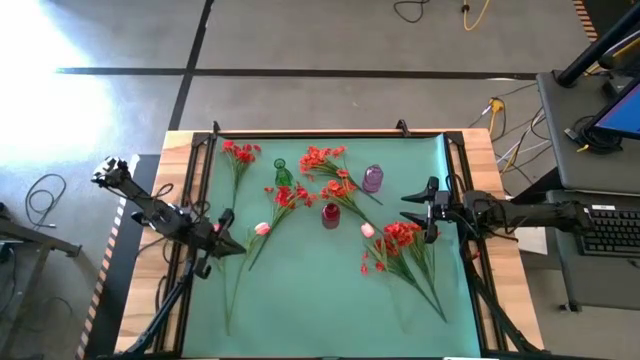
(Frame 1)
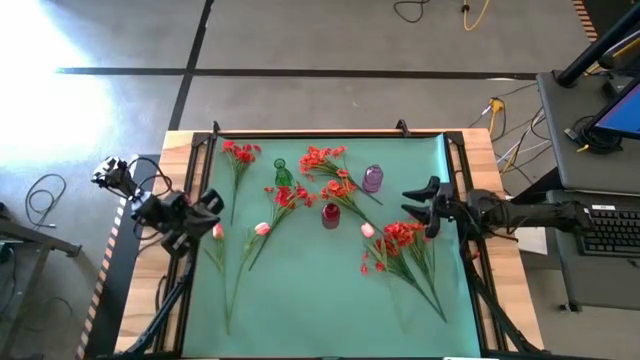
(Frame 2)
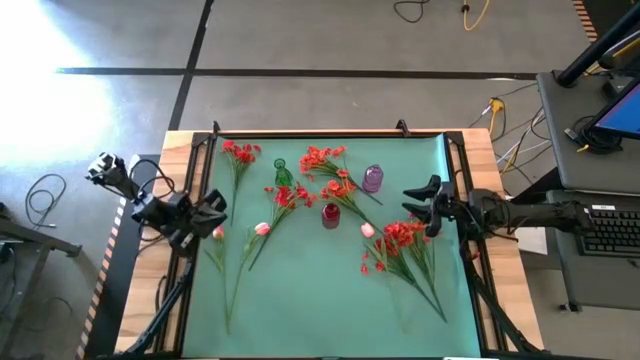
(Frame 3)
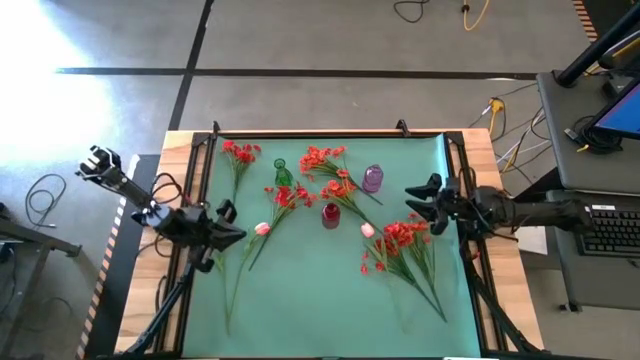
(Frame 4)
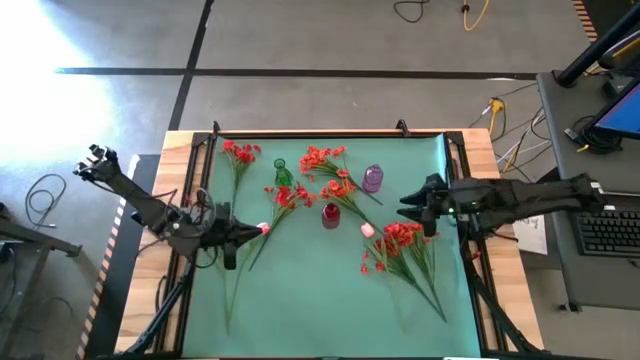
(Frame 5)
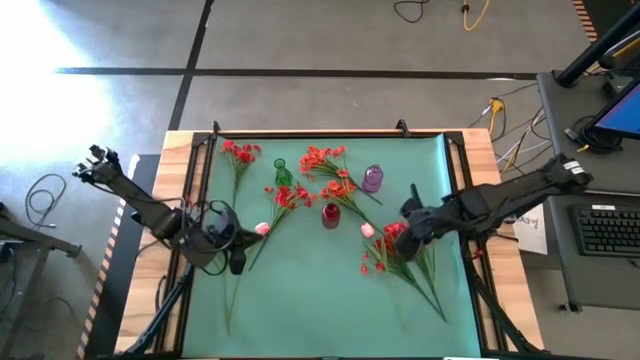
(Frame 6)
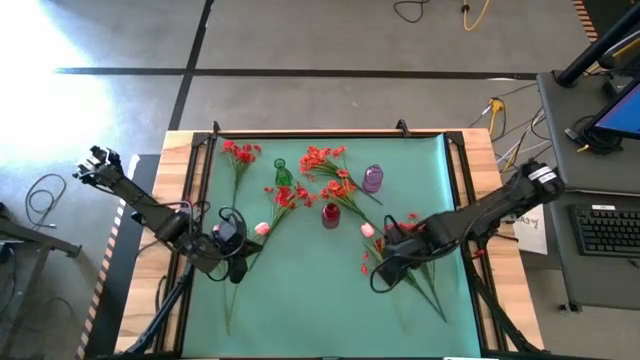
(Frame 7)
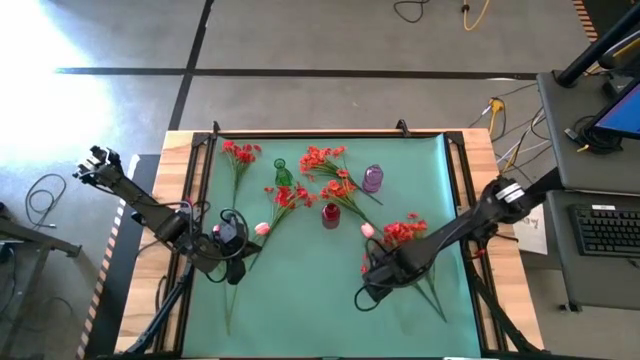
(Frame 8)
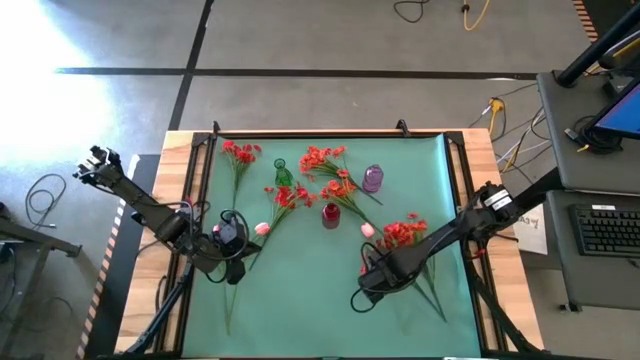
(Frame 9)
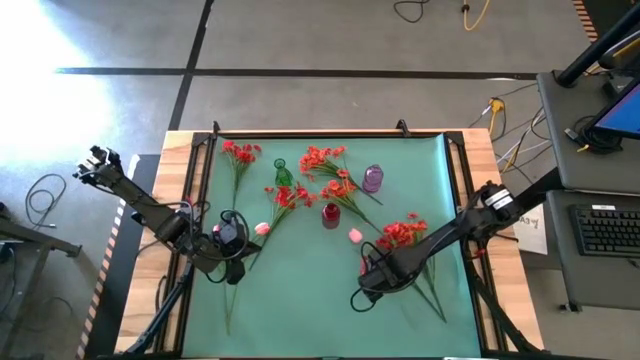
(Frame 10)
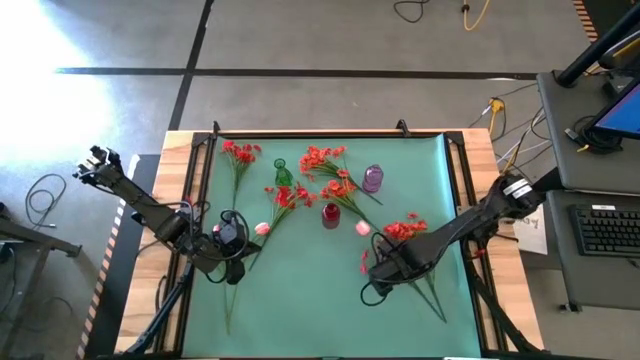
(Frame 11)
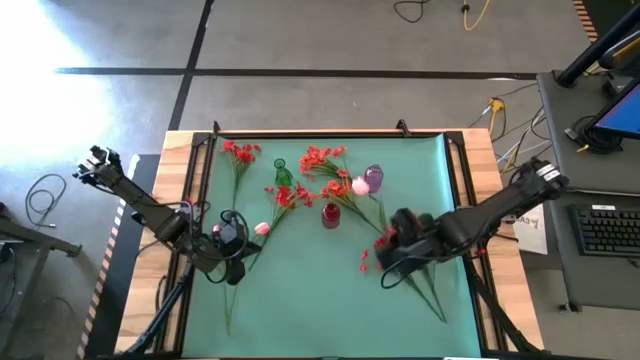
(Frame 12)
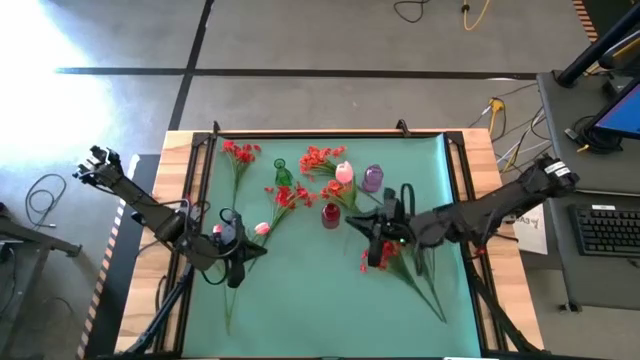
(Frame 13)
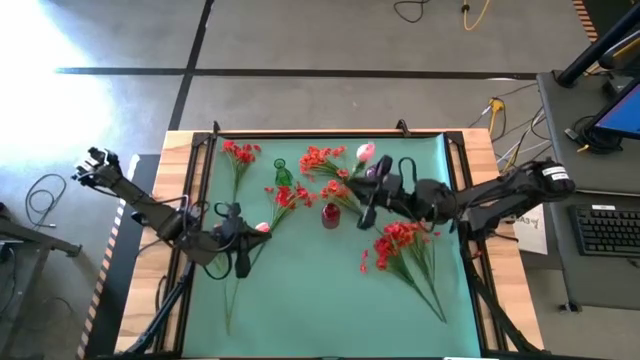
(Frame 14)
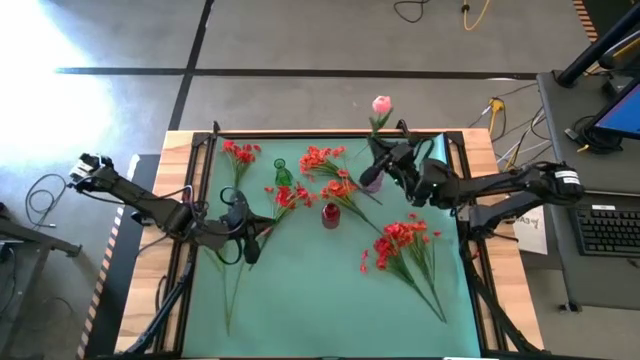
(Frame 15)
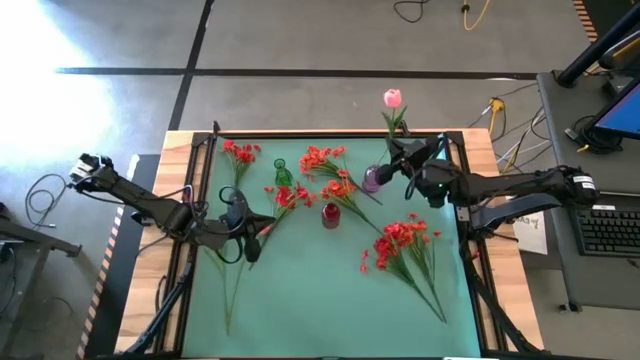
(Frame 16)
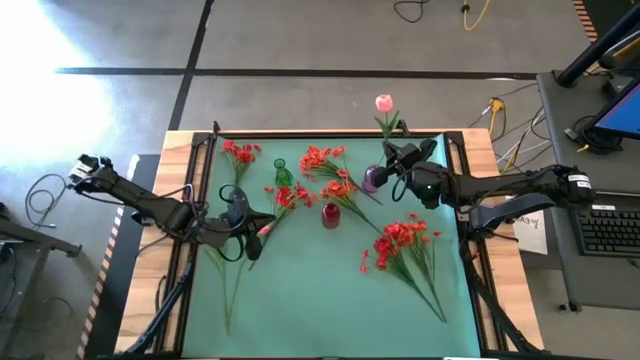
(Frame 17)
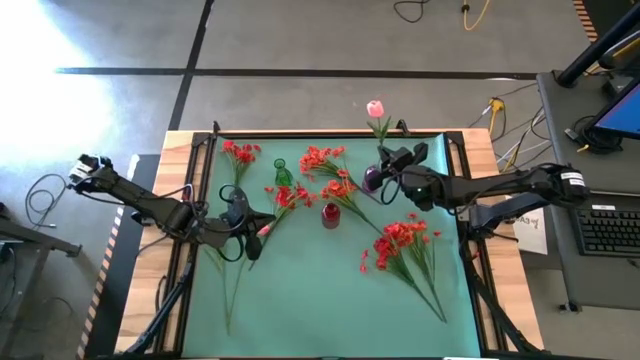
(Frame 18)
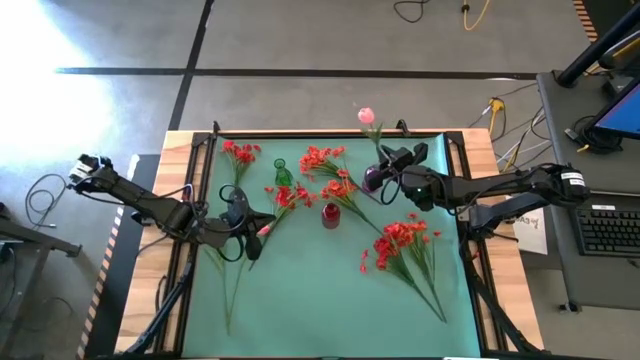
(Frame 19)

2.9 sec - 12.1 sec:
Task: Sort flowers into vase by color
Put the pink tulip into the purple vase

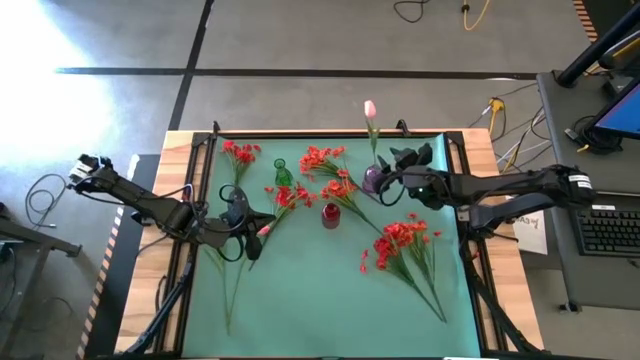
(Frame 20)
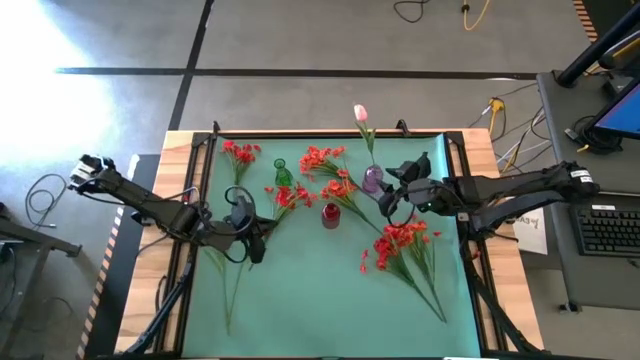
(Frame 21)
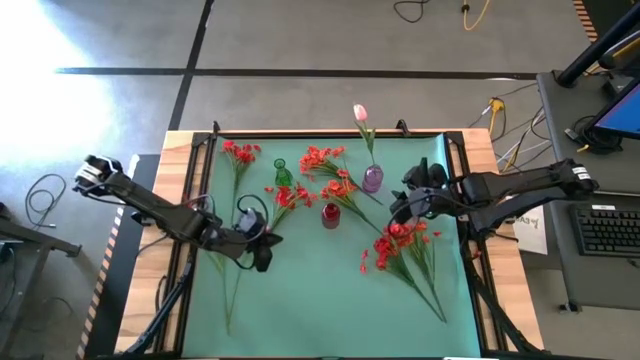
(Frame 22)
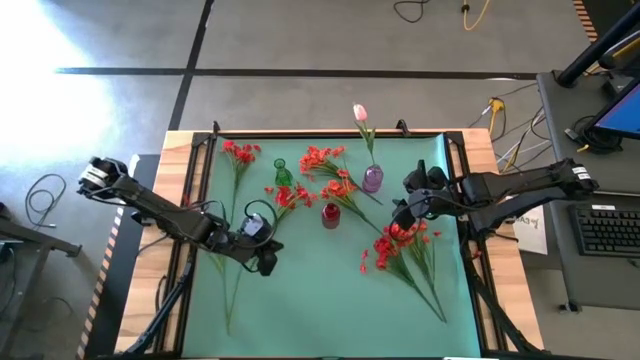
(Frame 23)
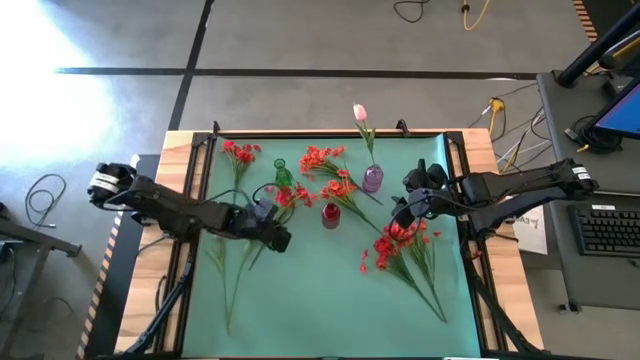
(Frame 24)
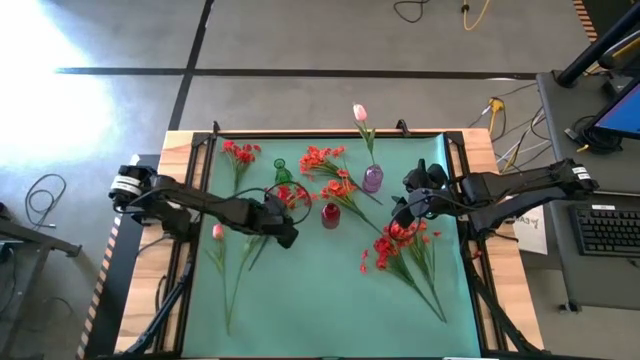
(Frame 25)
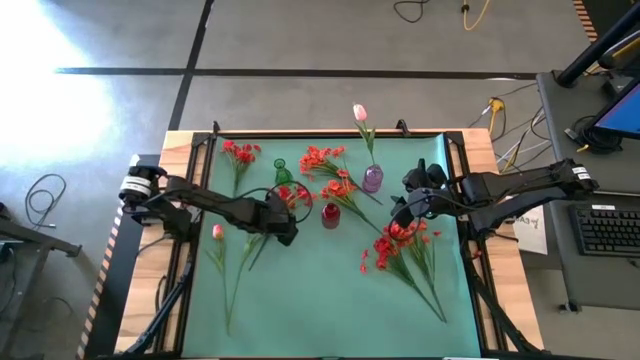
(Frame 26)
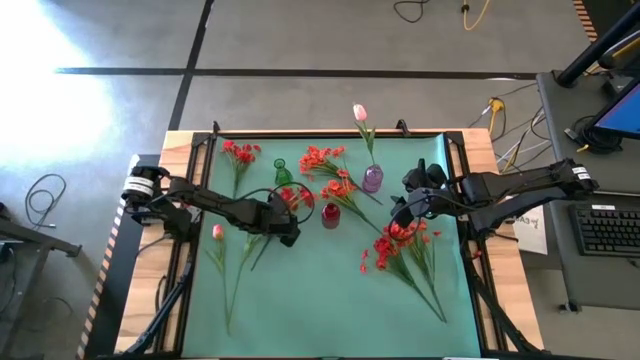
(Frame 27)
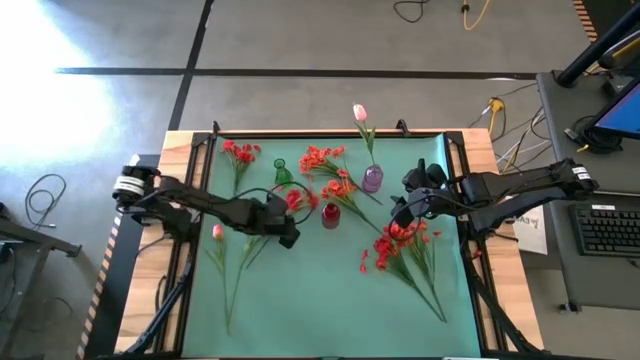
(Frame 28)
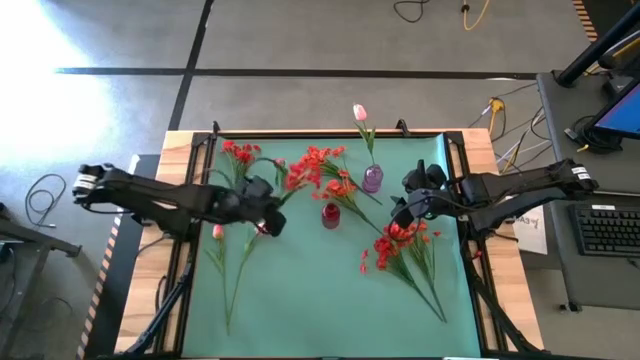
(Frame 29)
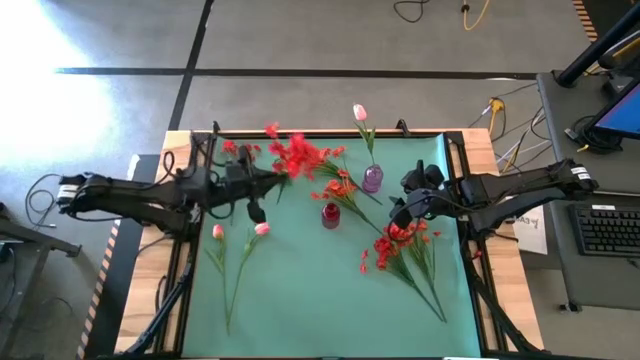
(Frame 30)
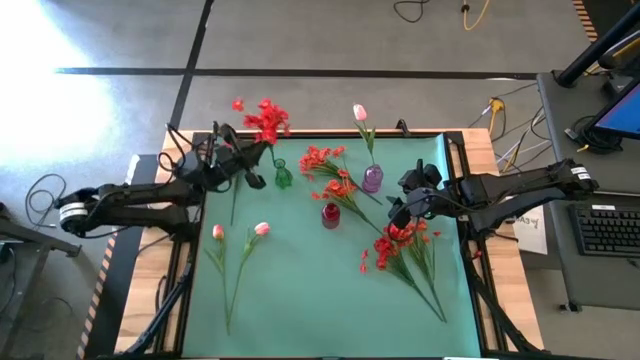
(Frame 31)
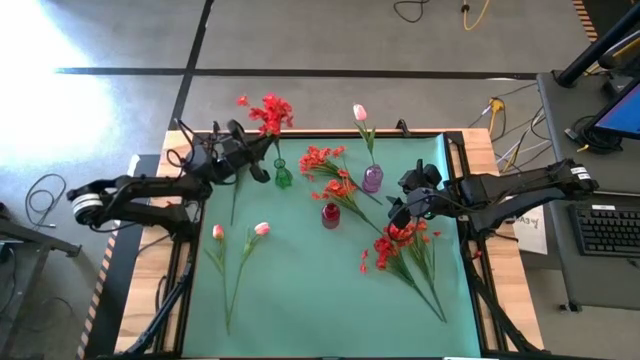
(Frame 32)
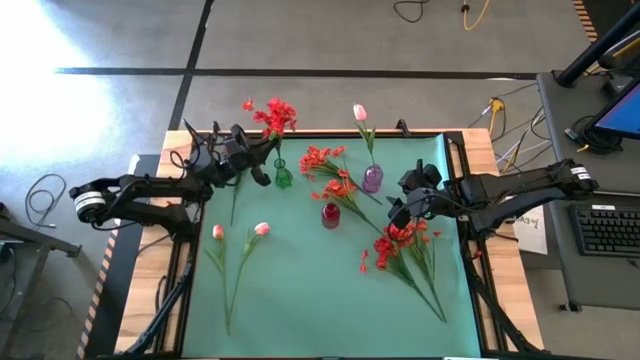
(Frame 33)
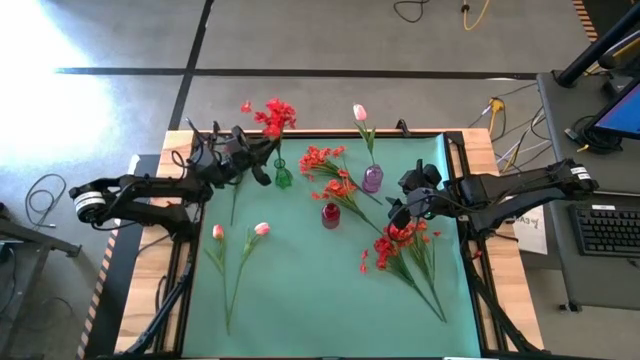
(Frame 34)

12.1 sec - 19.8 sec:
Put the red flowers into the green vase

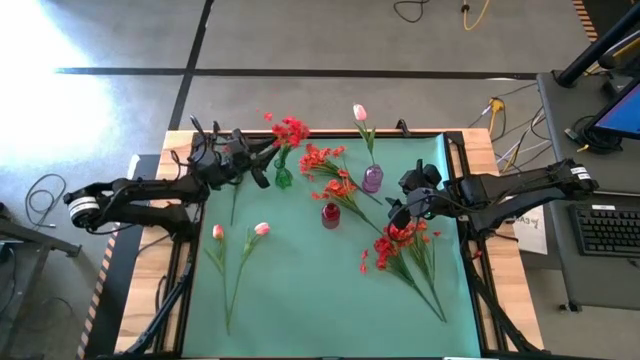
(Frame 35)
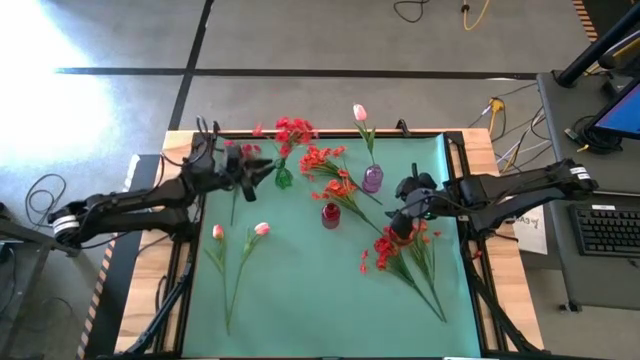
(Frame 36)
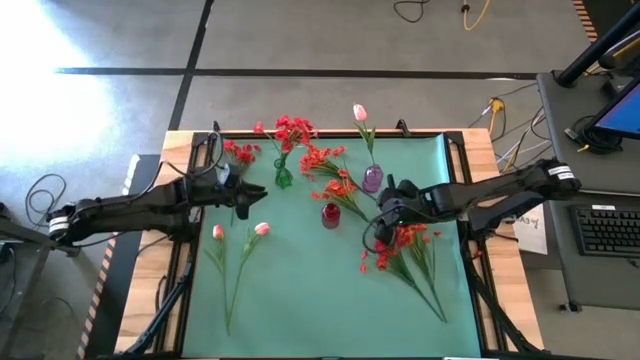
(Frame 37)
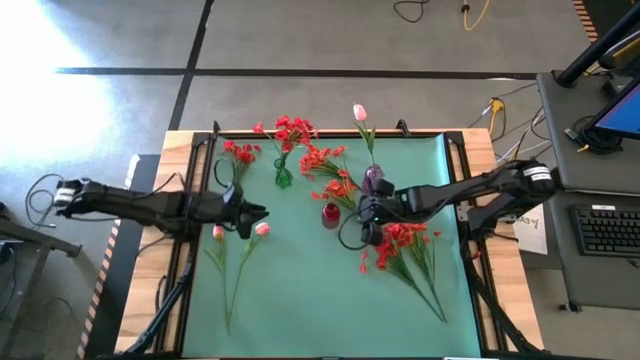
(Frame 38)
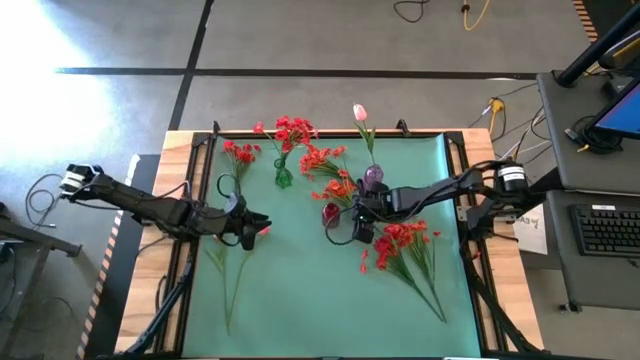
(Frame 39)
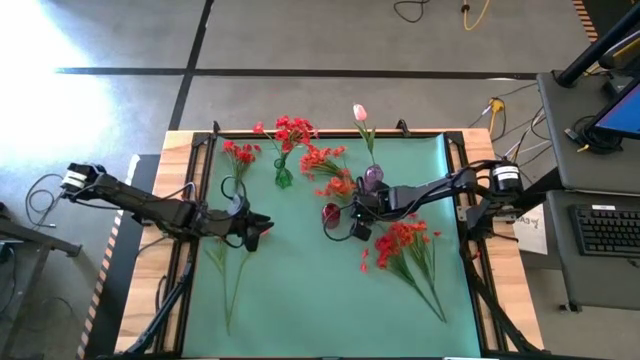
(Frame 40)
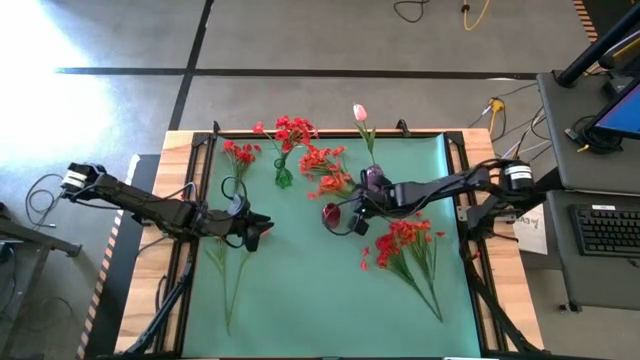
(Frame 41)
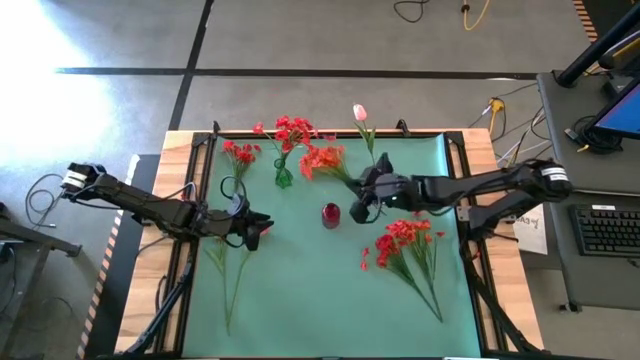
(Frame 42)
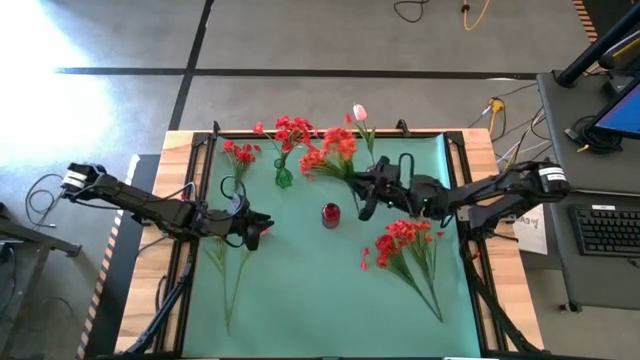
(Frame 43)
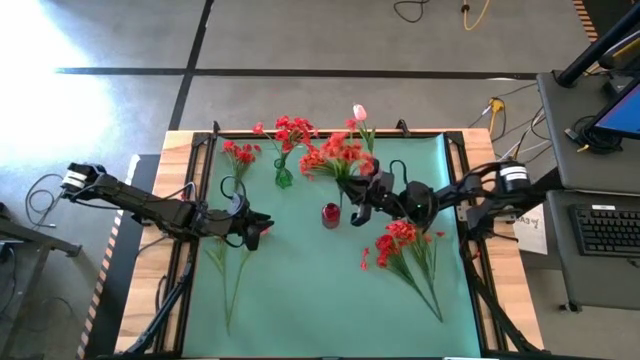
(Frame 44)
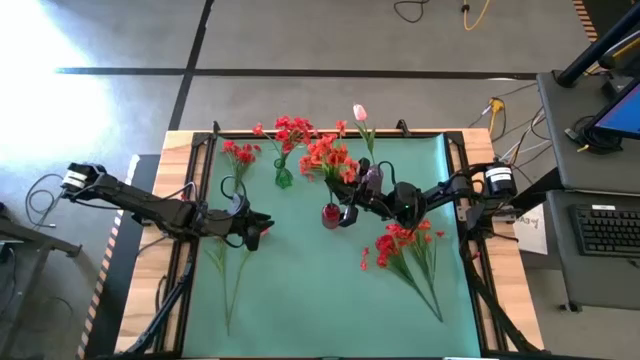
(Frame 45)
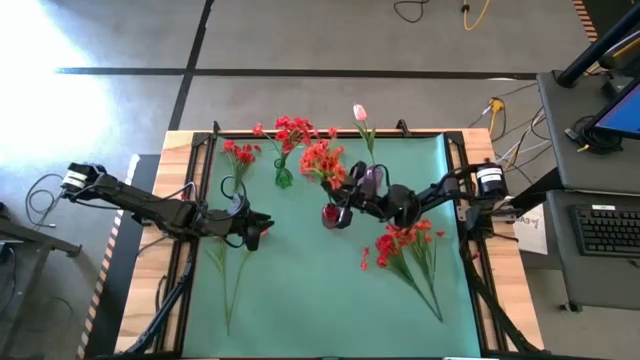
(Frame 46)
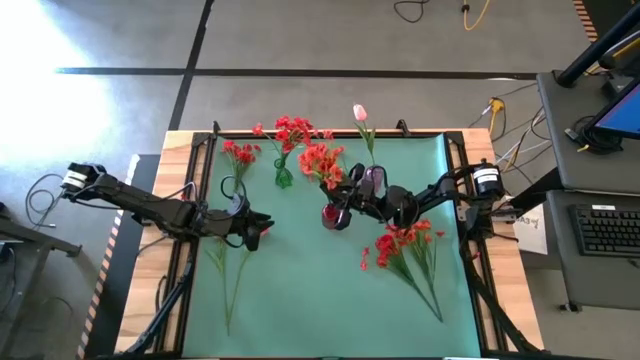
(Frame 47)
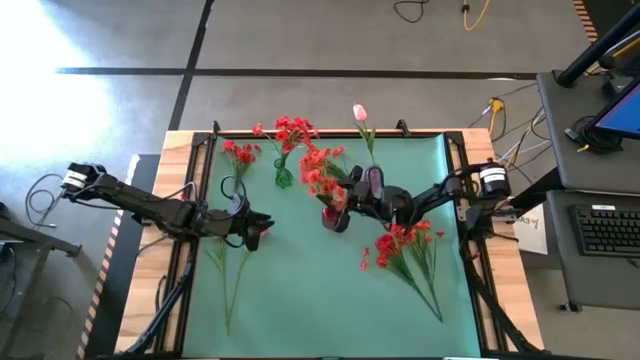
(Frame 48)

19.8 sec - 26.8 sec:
Put the orange flowers into the red vase
